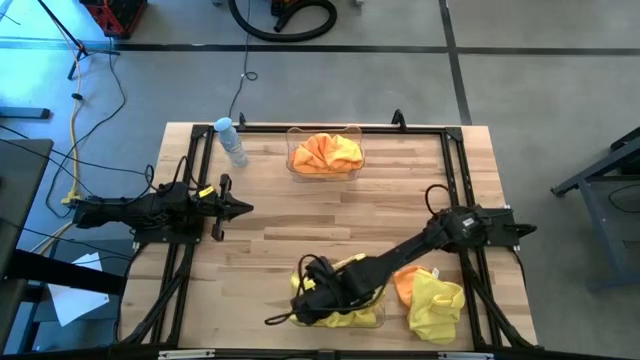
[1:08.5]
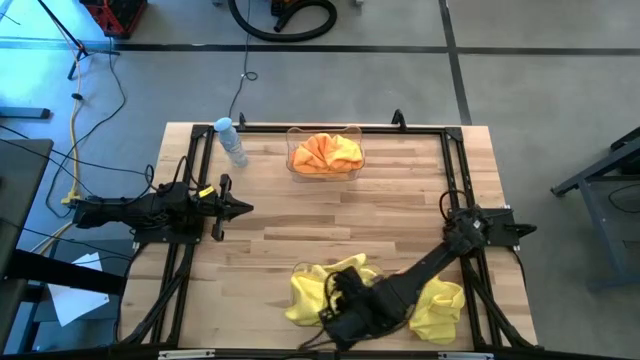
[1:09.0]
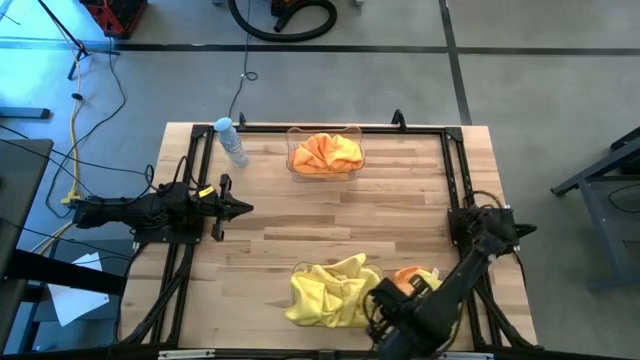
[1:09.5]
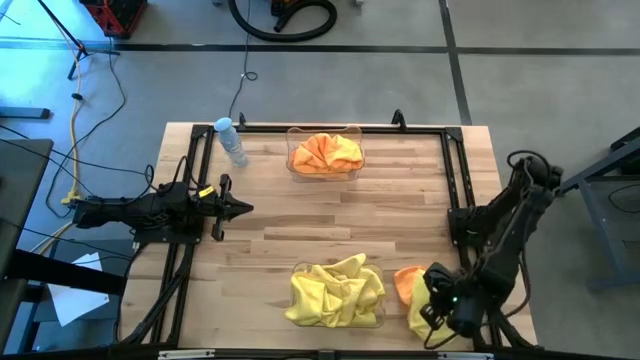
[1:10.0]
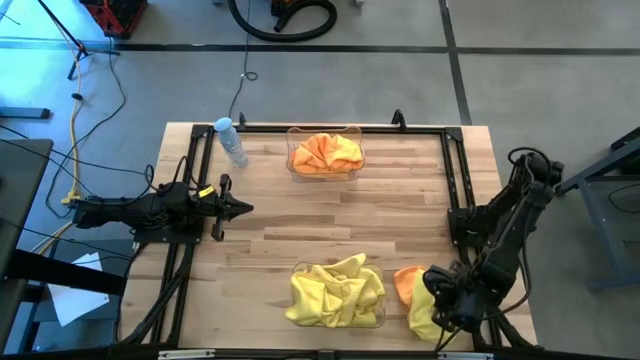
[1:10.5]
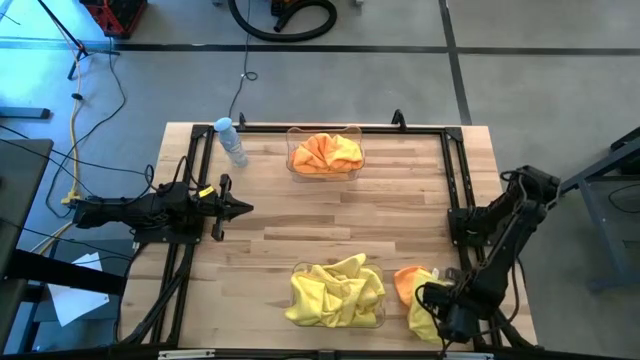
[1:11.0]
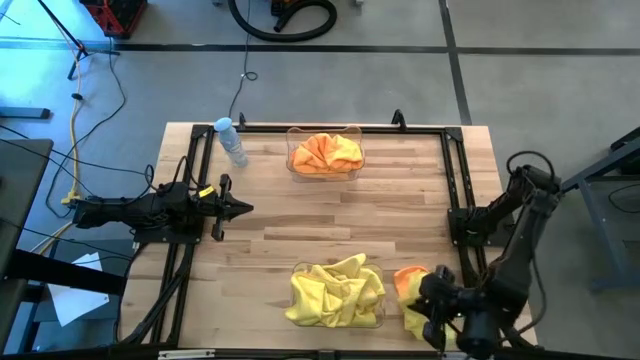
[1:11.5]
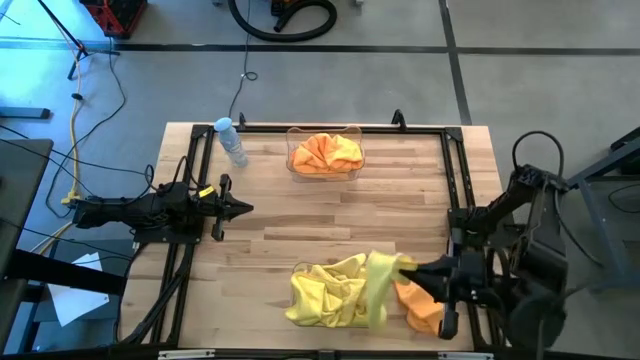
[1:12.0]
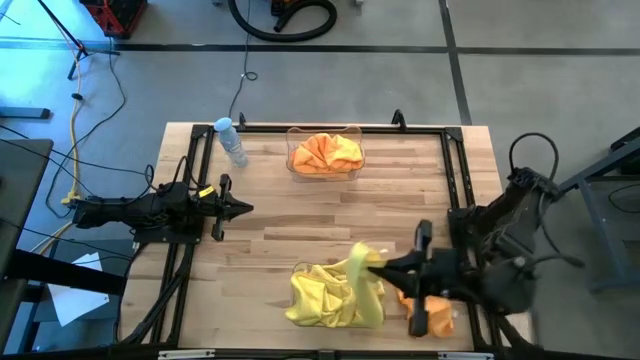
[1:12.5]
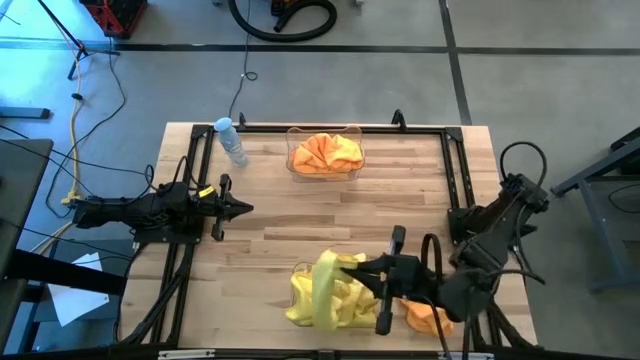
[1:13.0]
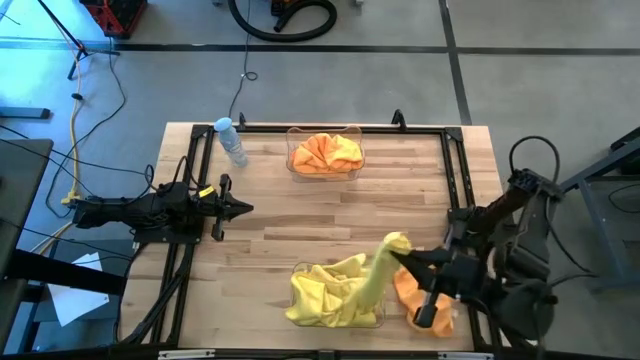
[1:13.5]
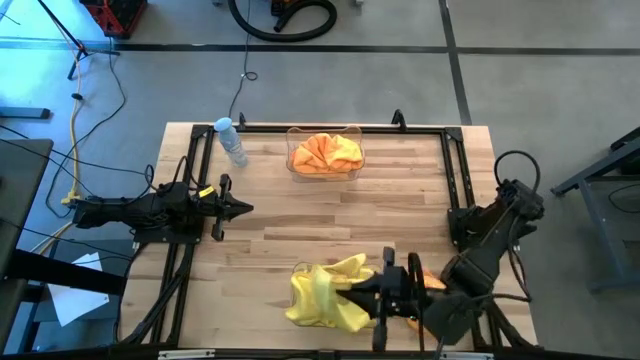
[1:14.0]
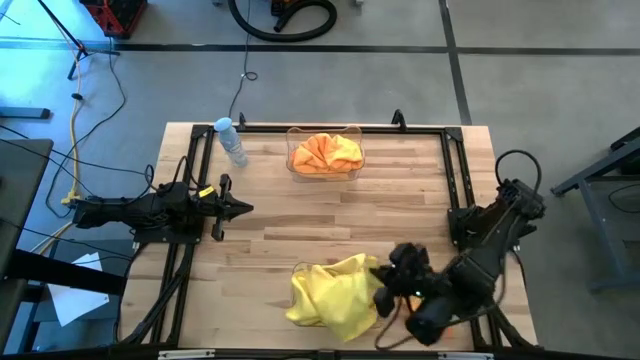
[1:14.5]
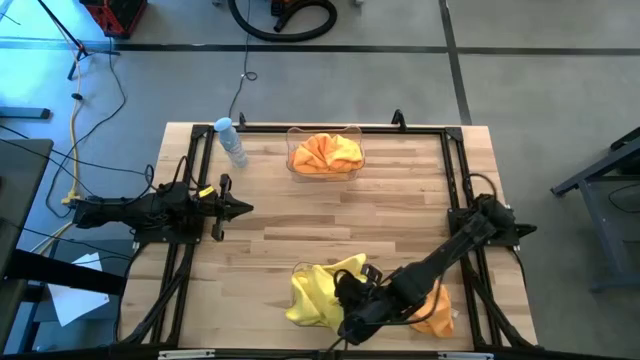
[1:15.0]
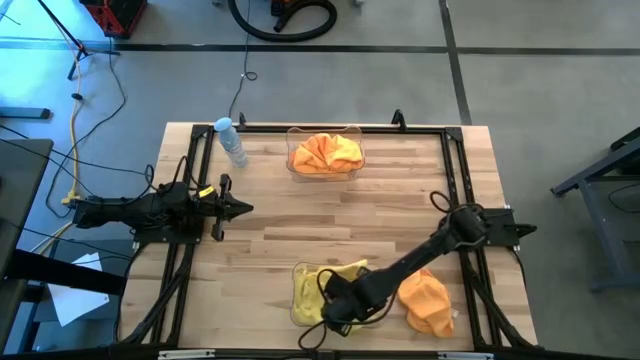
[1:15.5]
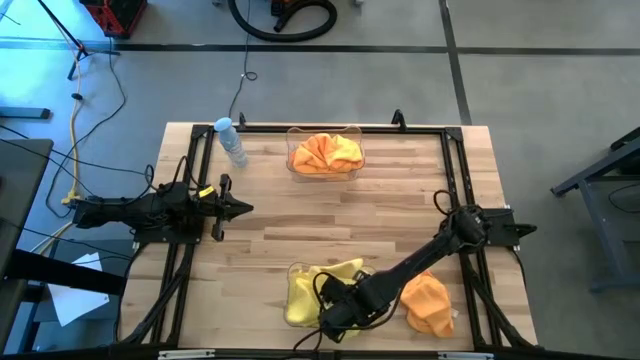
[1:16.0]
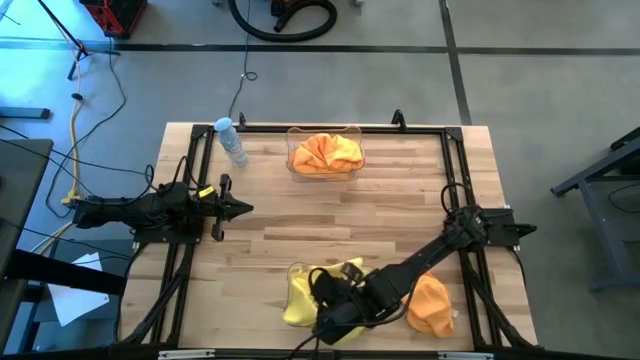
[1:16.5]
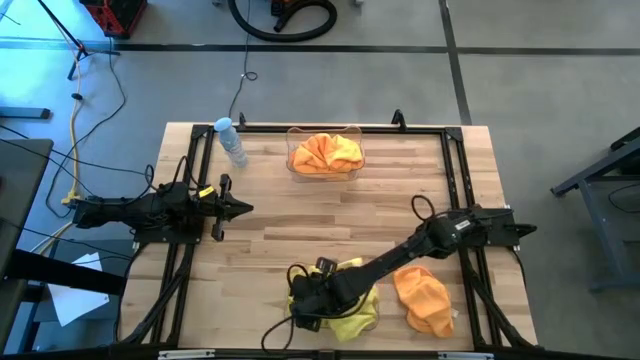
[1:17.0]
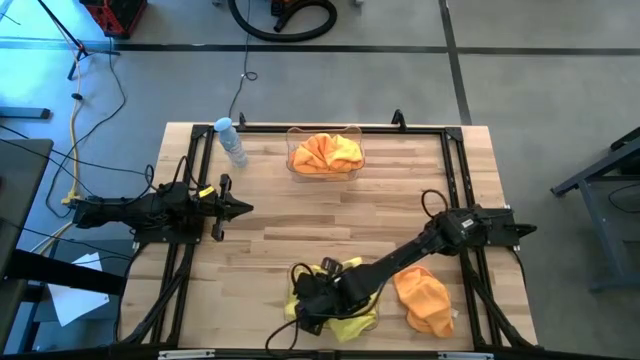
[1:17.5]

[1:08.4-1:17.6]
Task: Sort microfiber towel by color & place in baskets
Put the yellow microfiber towel into the bottom transparent bin

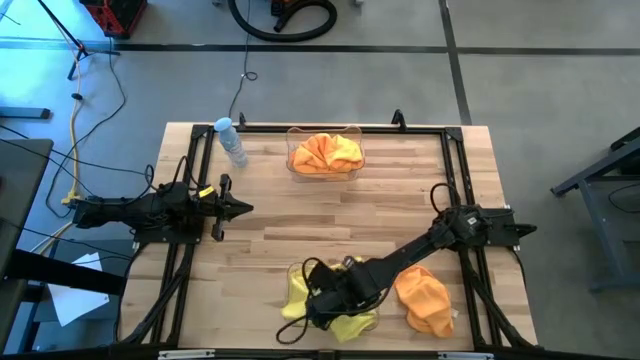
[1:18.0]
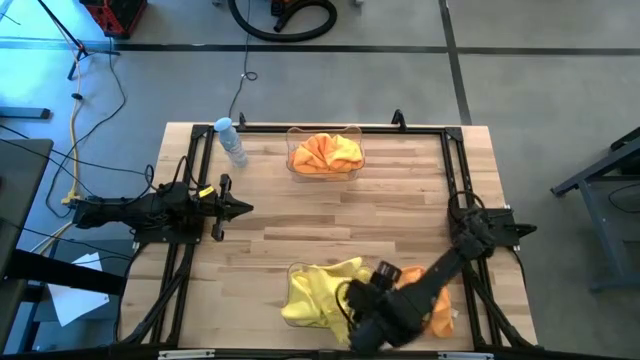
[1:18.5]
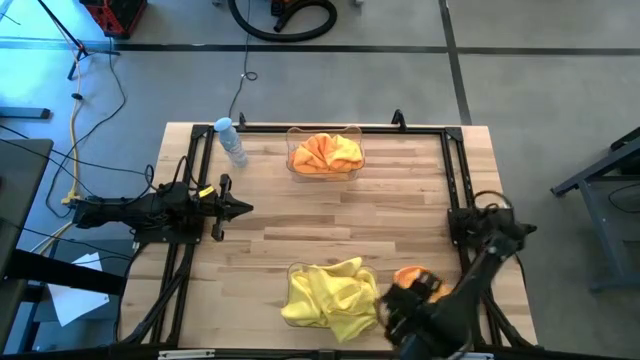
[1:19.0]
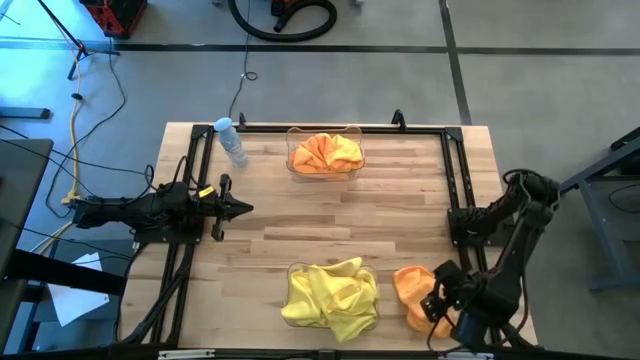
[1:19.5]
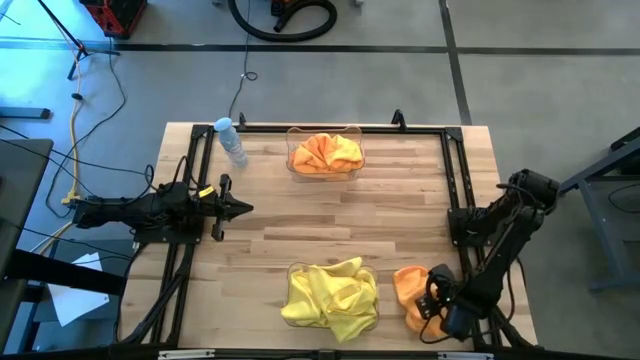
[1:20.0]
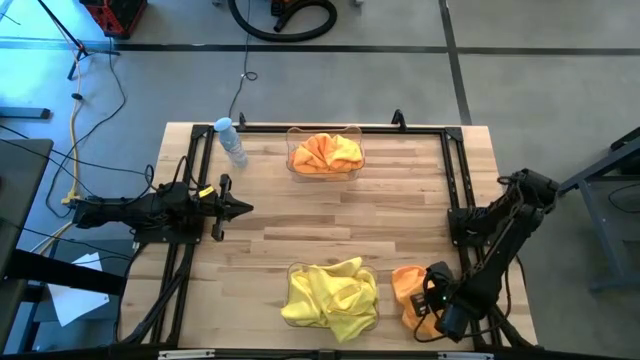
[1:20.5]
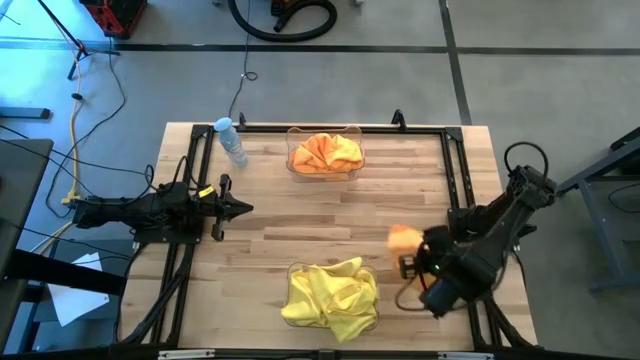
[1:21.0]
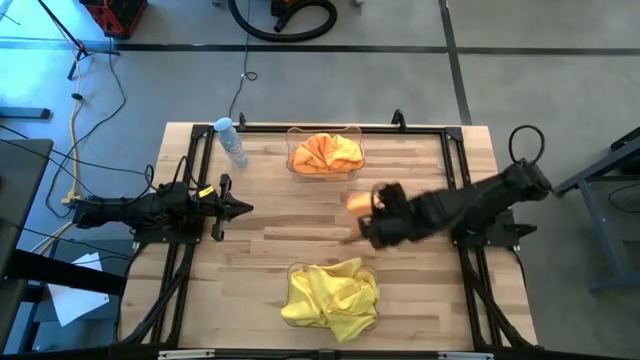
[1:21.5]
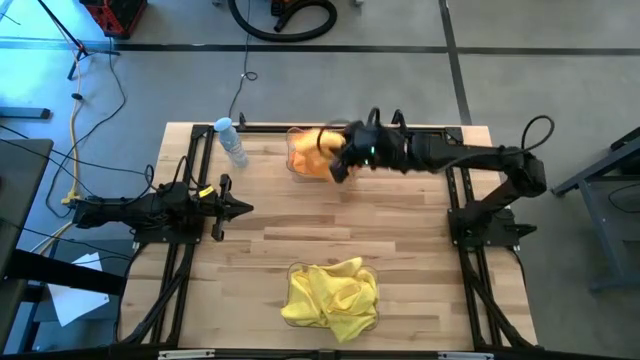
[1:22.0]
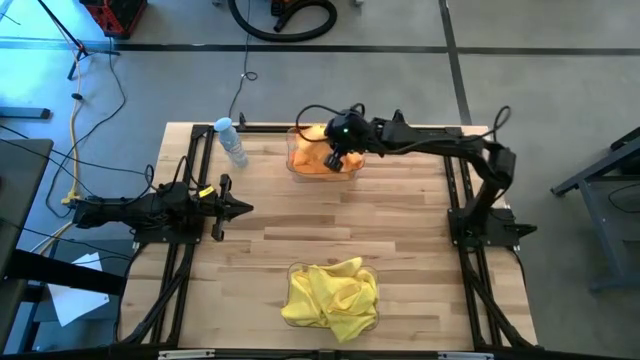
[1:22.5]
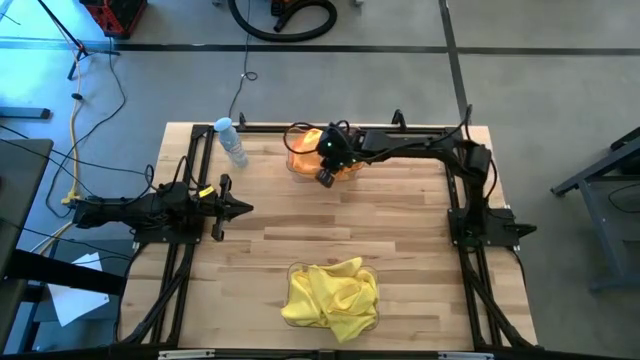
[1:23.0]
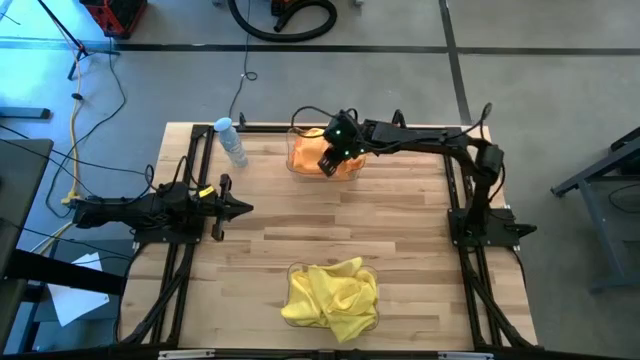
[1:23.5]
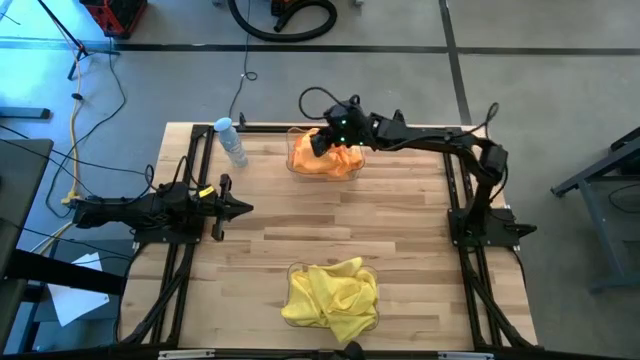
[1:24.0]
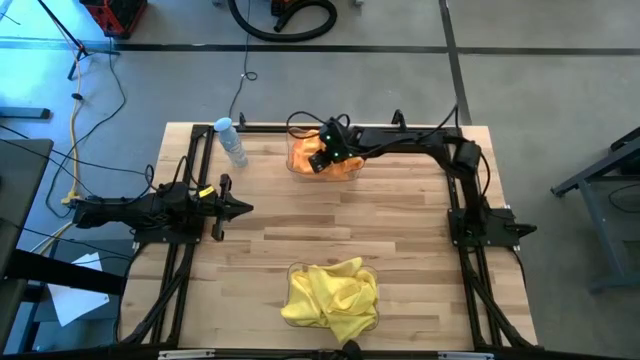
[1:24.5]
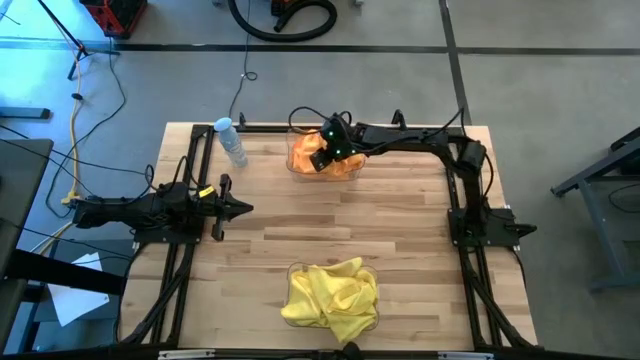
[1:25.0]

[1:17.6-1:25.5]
Put the orange microfiber towel into the top transparent bin

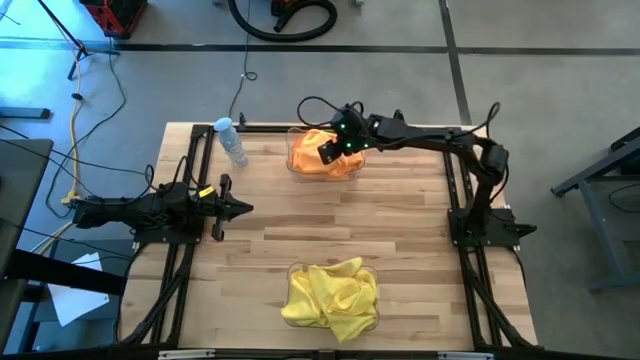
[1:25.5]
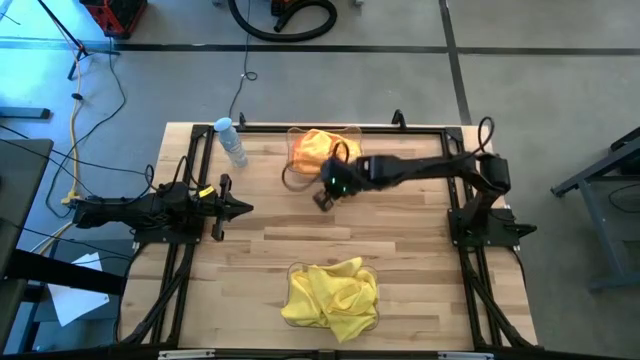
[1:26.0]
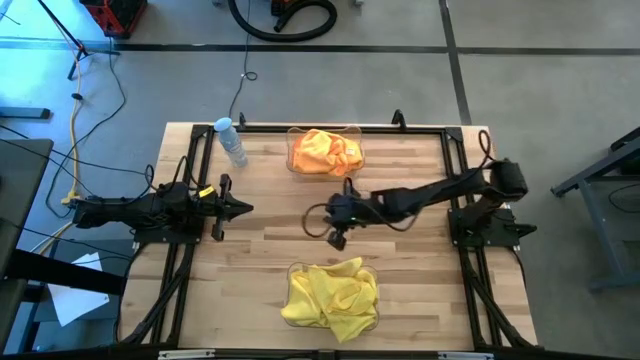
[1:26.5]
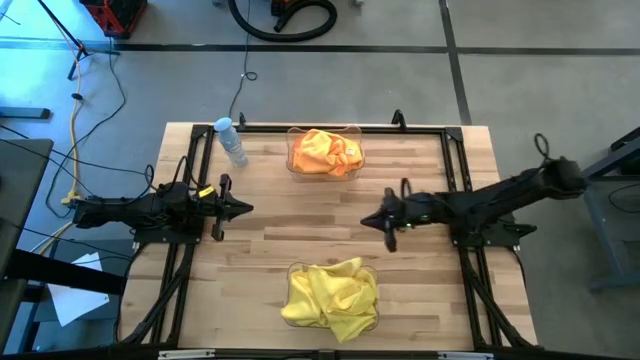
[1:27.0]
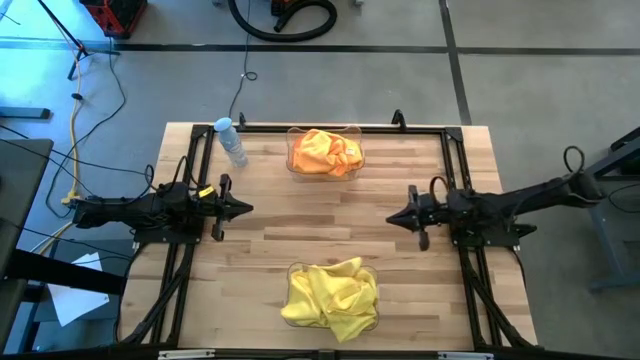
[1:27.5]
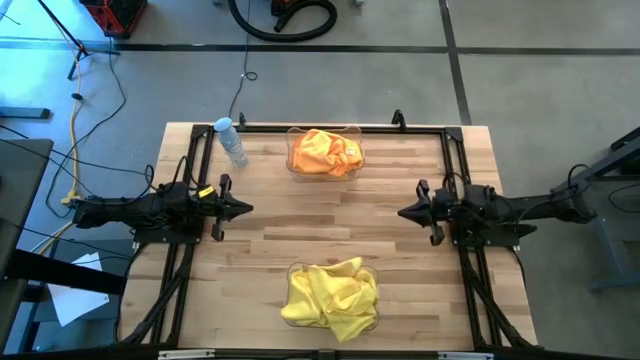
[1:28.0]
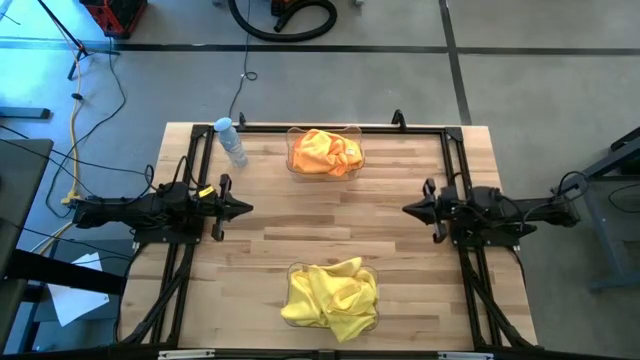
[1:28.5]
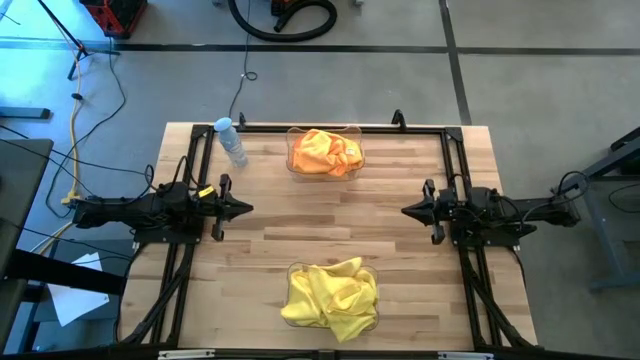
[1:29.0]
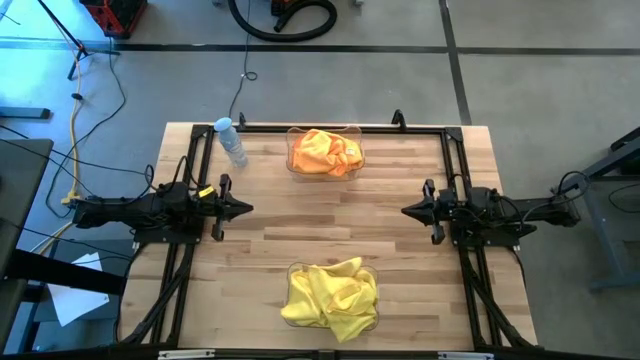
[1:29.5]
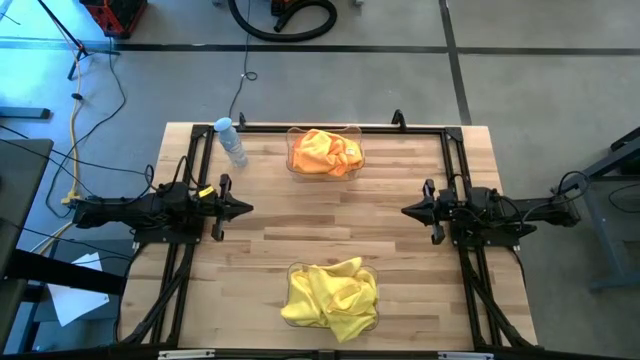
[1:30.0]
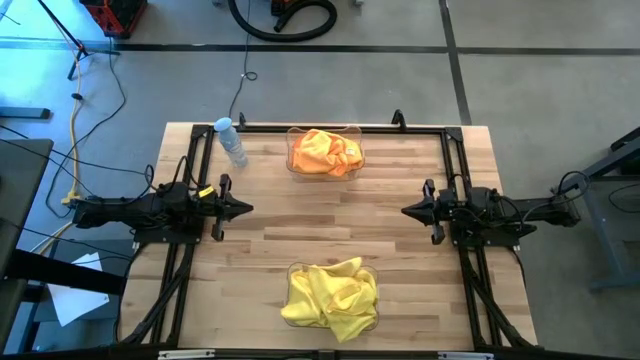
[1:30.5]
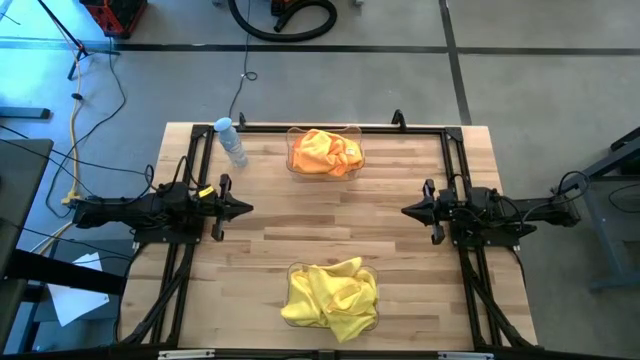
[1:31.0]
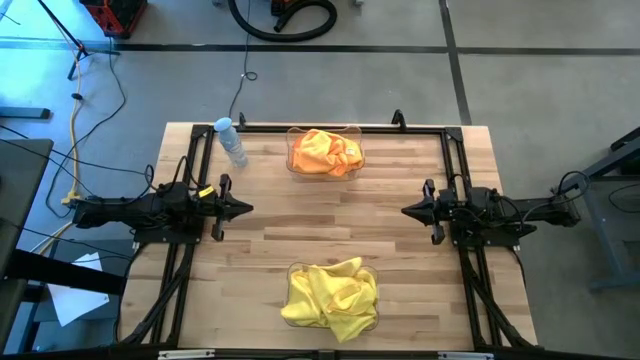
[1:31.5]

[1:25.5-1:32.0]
Return to Home Position
